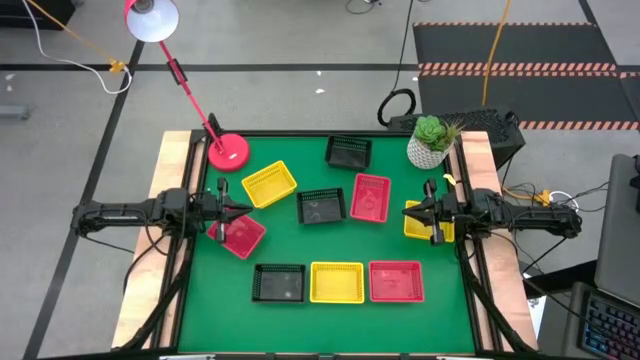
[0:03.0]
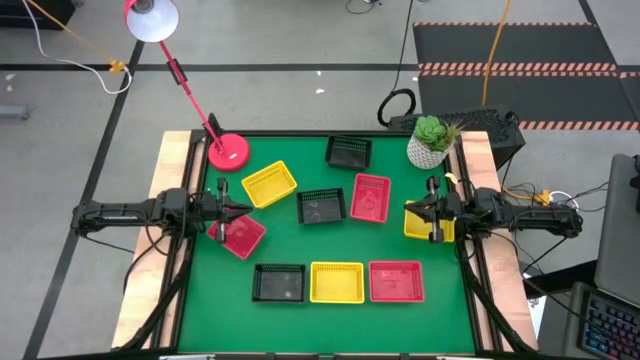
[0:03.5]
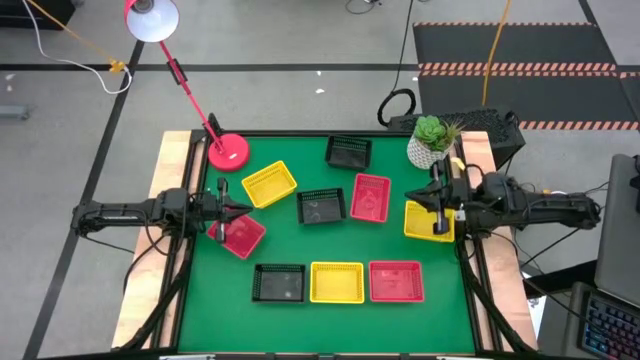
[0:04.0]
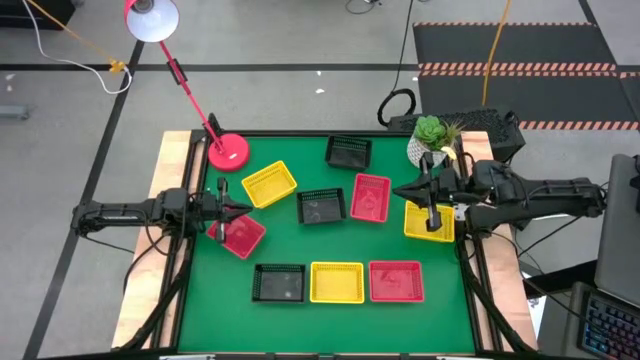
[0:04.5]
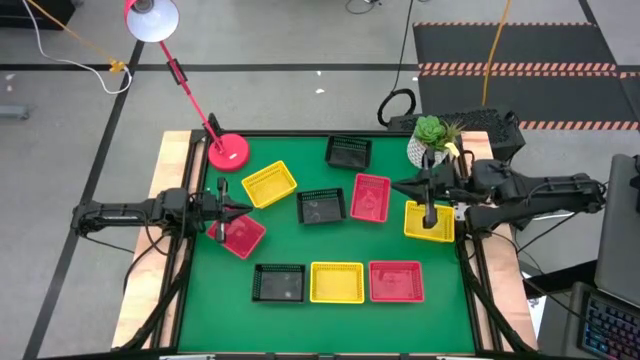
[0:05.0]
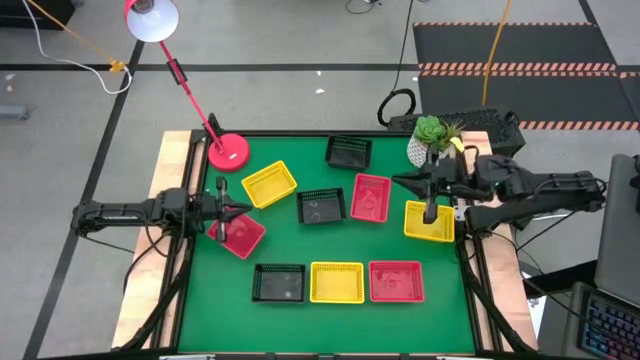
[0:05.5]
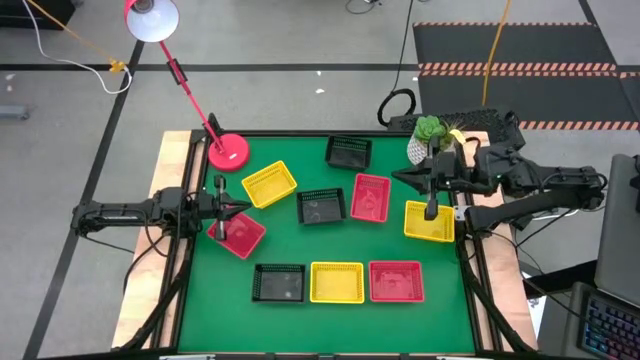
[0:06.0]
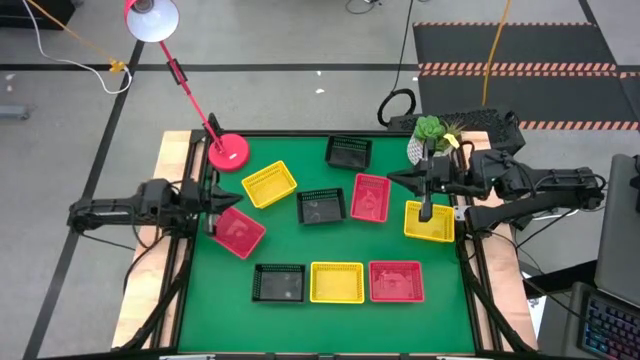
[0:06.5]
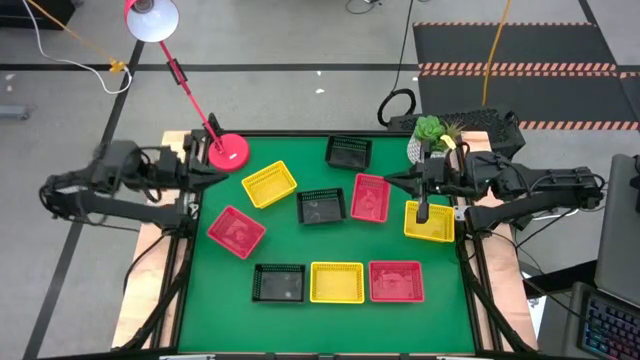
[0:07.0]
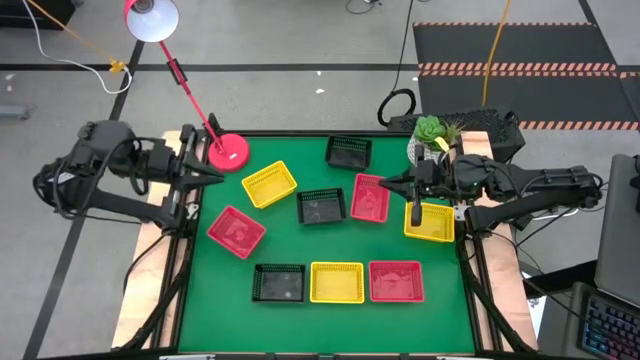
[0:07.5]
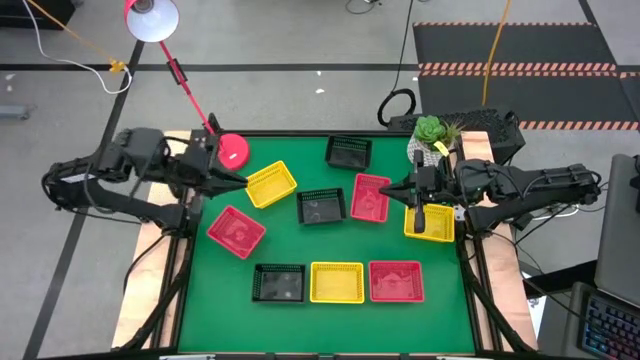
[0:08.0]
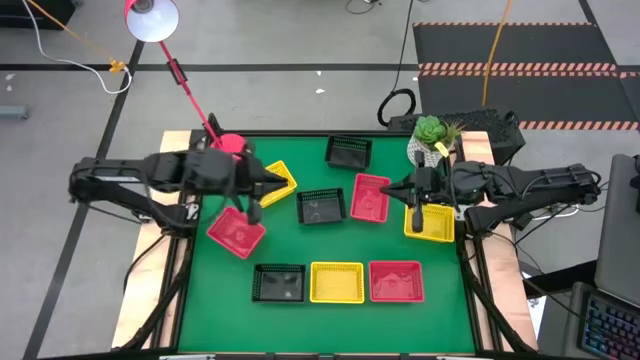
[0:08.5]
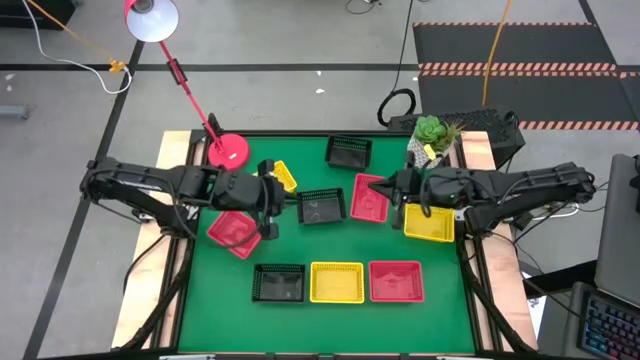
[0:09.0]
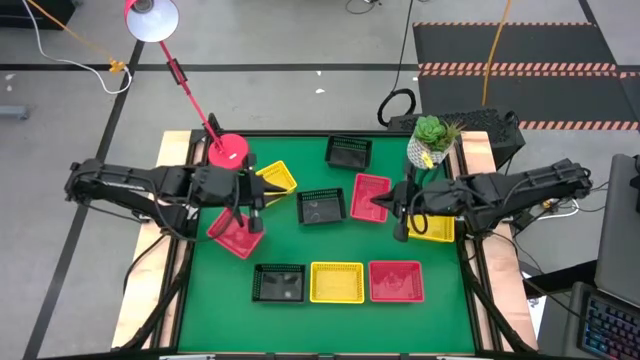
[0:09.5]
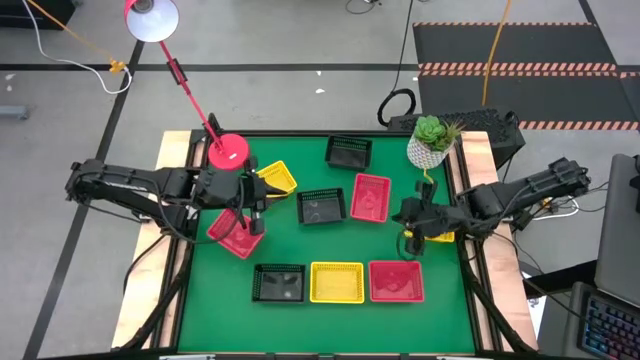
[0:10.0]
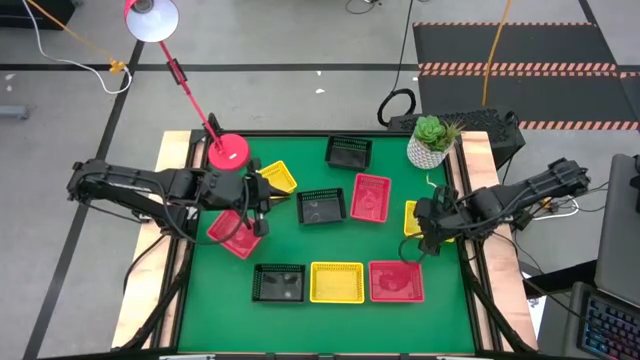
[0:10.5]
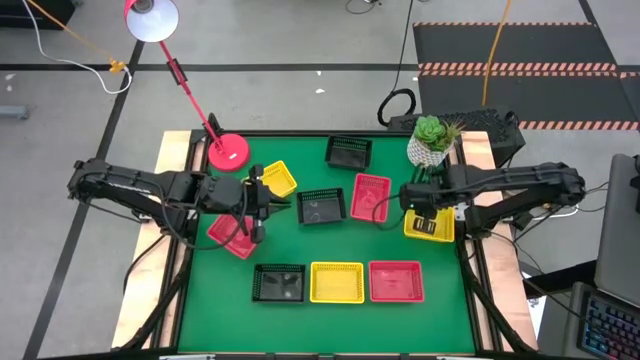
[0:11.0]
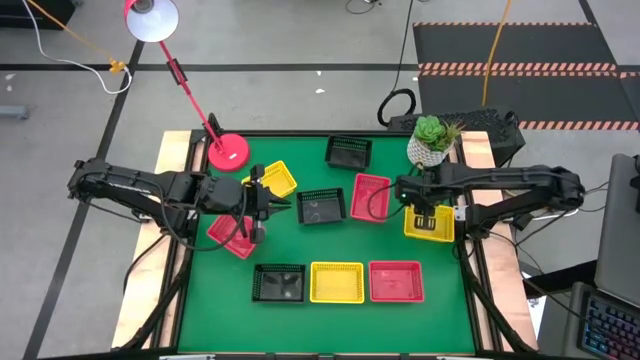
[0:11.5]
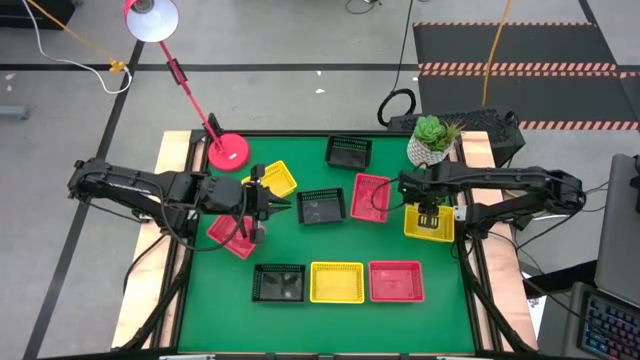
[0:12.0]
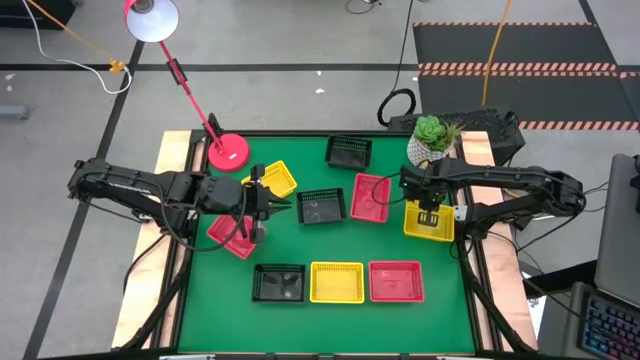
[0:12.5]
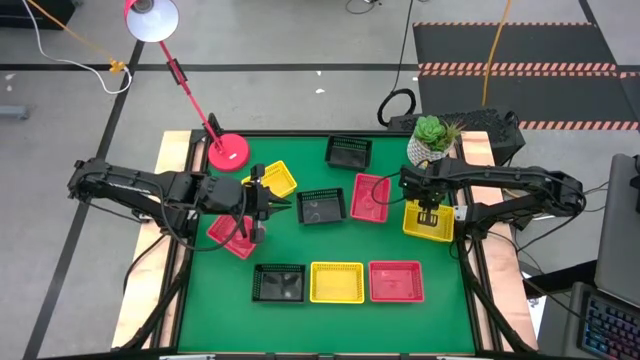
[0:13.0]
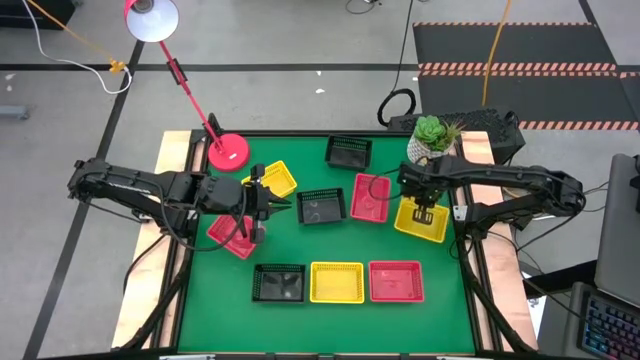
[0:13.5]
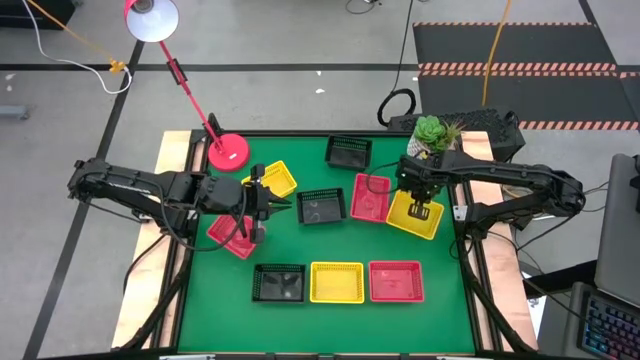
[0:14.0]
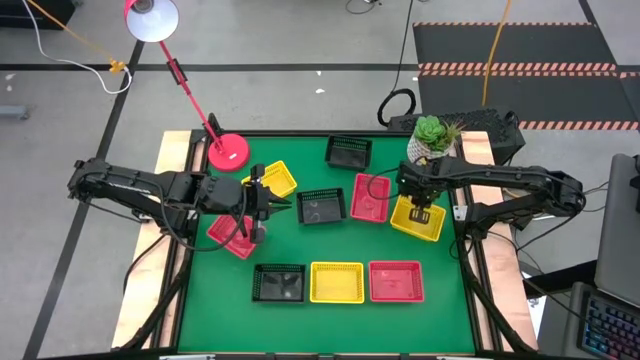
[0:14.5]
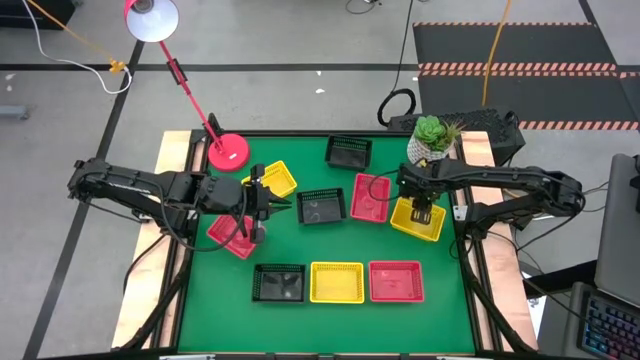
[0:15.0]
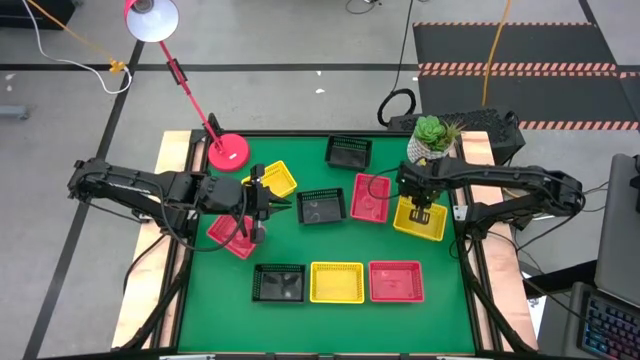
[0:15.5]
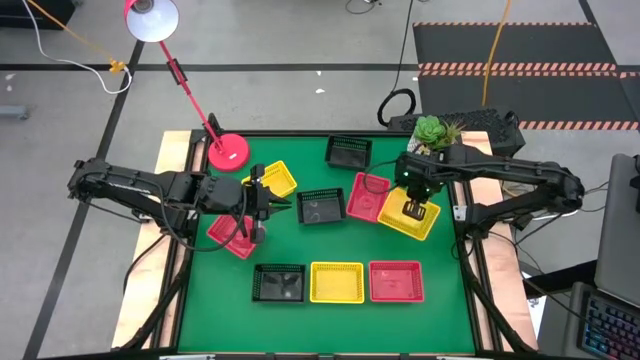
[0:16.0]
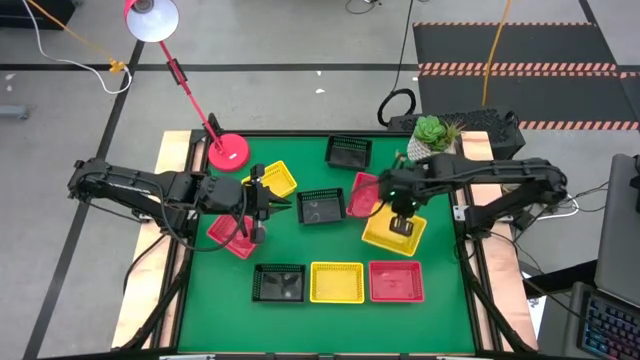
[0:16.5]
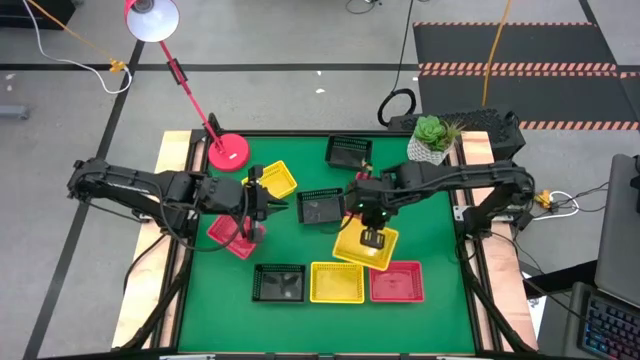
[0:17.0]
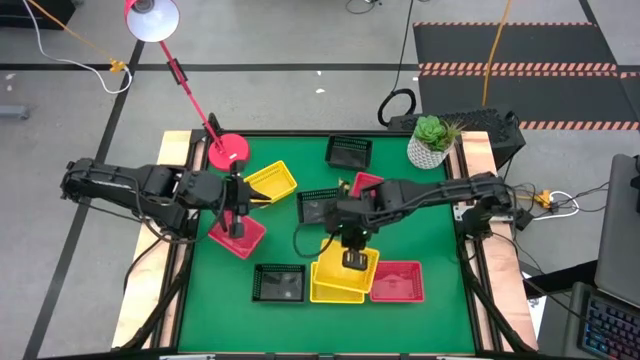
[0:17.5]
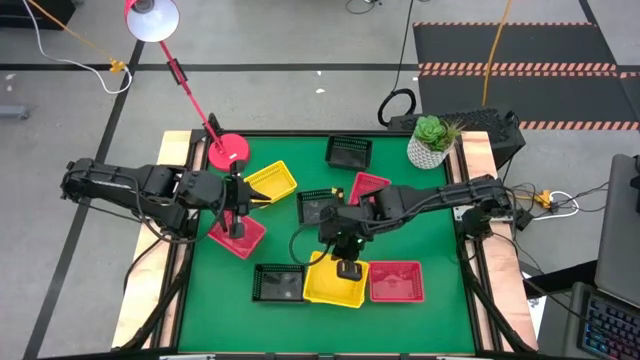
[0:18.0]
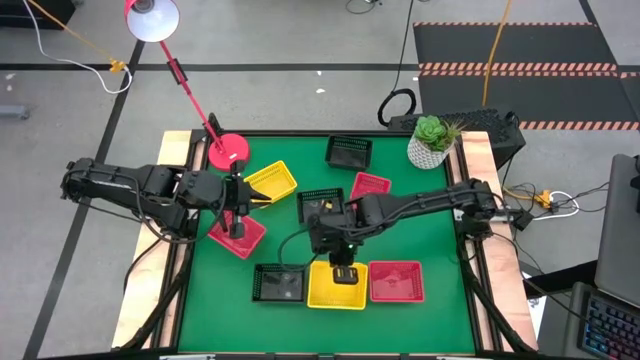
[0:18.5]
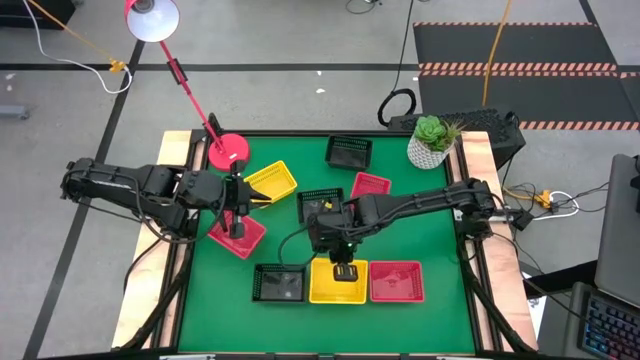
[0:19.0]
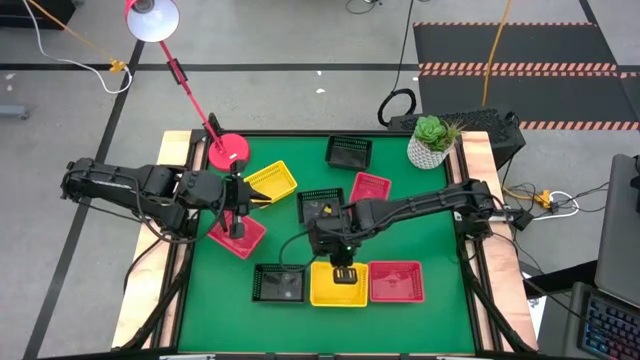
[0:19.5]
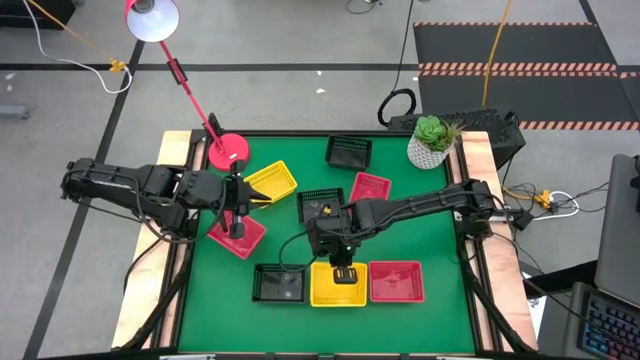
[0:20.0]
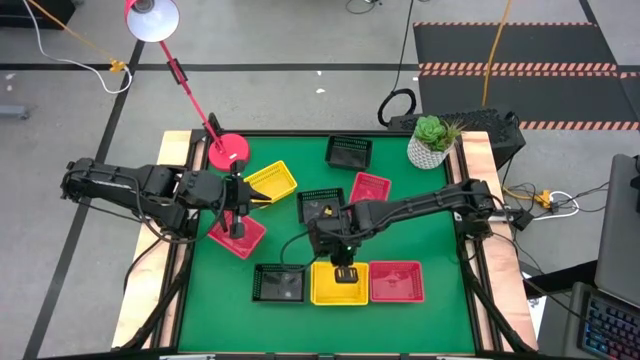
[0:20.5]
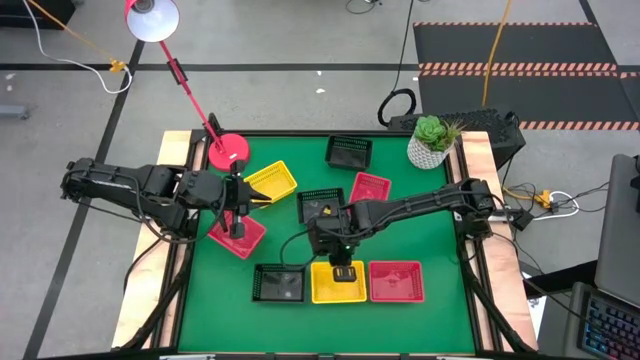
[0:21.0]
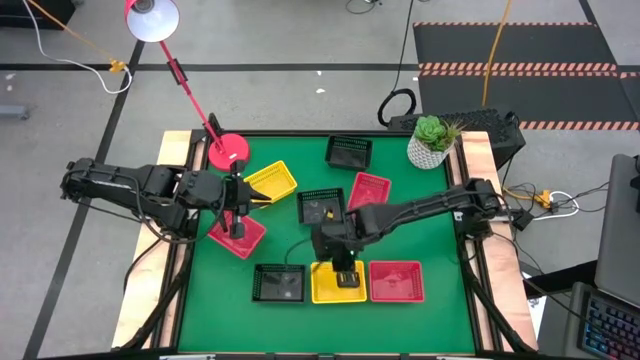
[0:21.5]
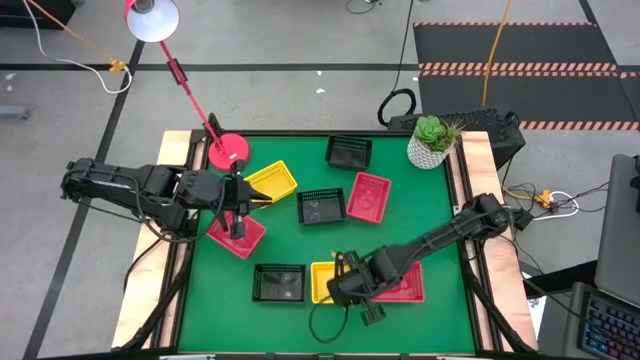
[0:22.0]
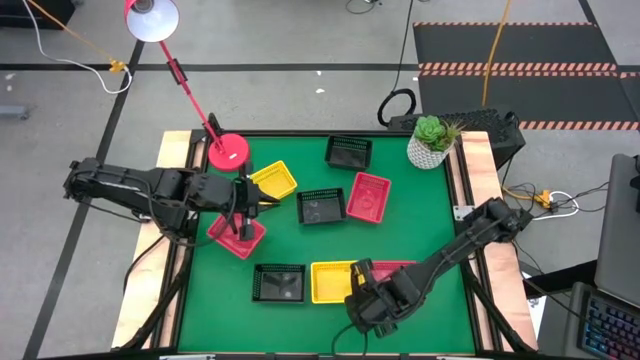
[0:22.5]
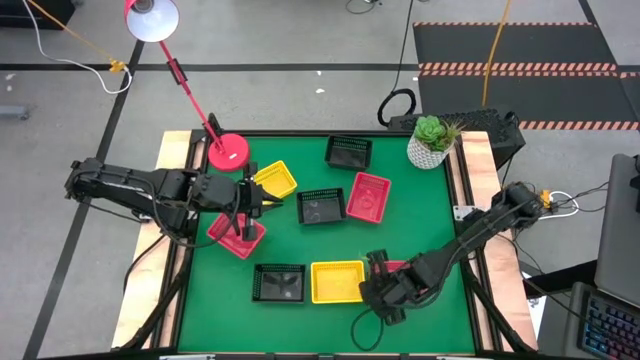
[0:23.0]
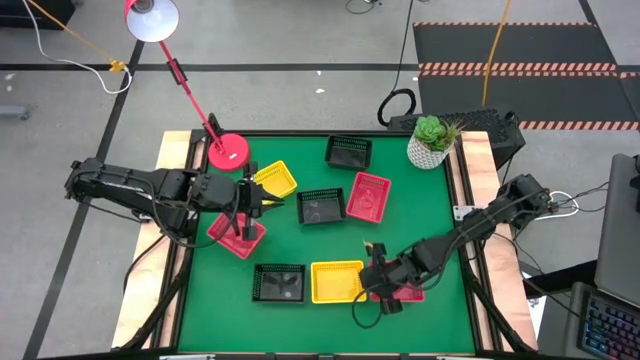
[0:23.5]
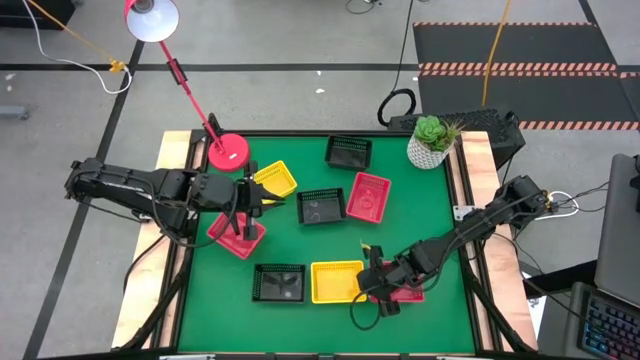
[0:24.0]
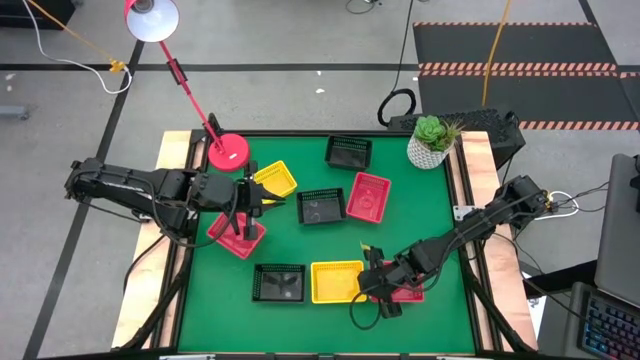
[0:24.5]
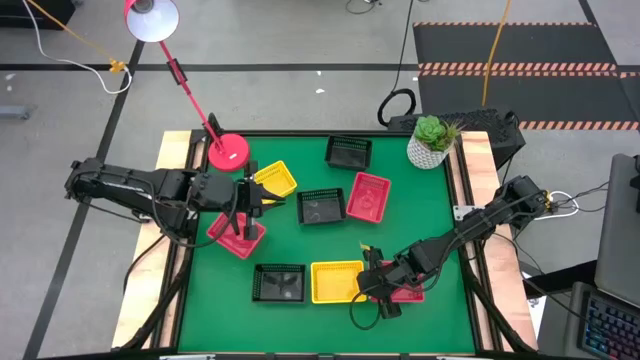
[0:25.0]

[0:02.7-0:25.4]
Stack the right yellow bin on top of the bottom yellow bin
